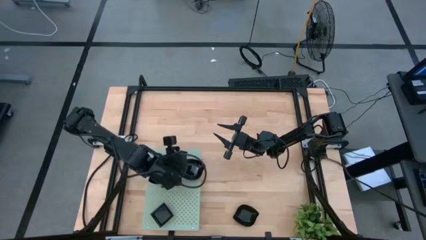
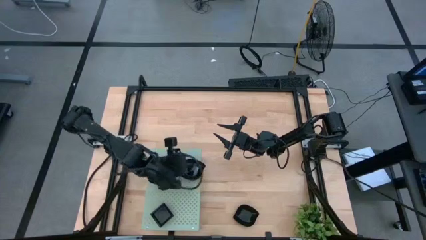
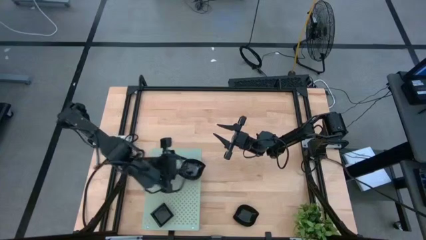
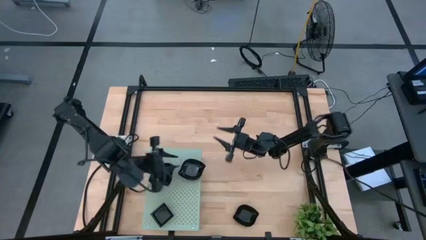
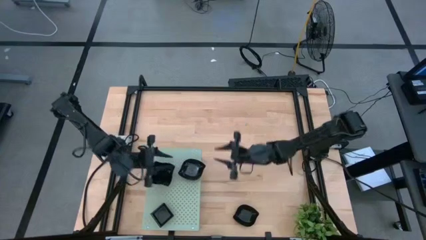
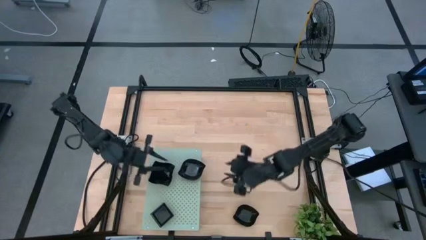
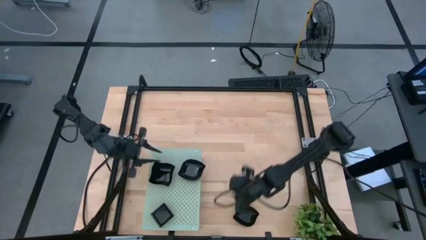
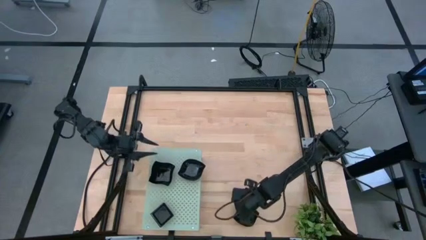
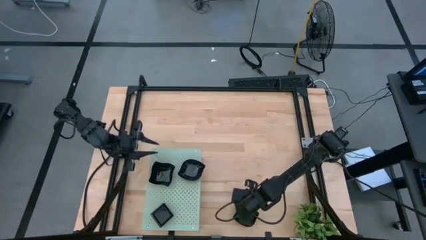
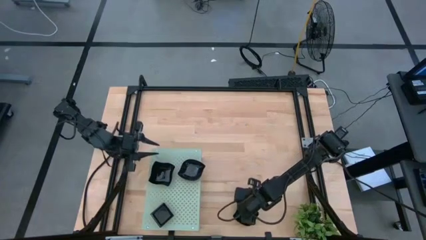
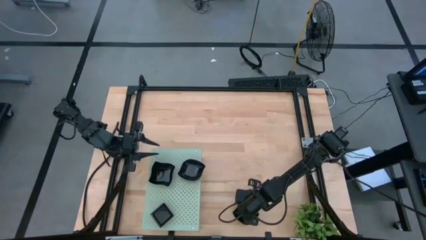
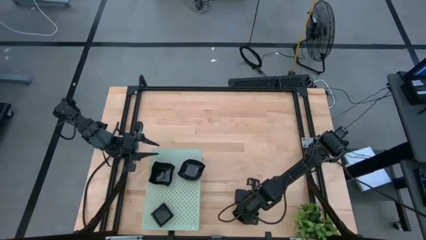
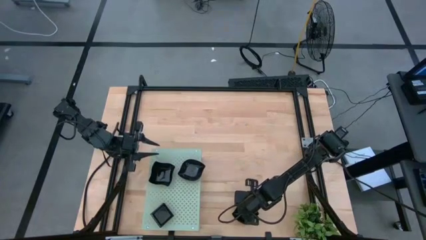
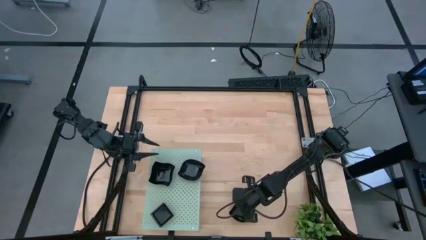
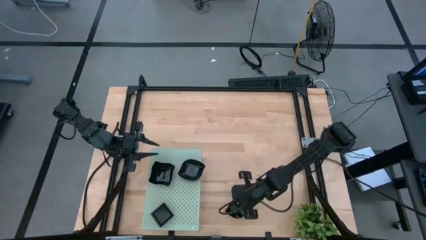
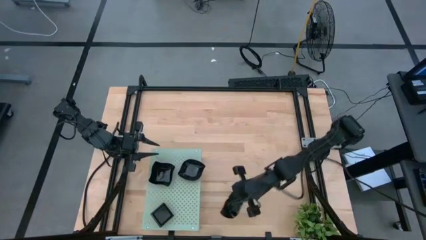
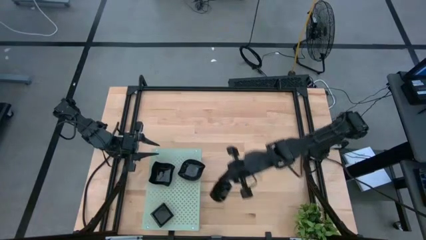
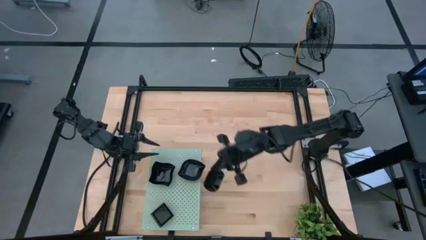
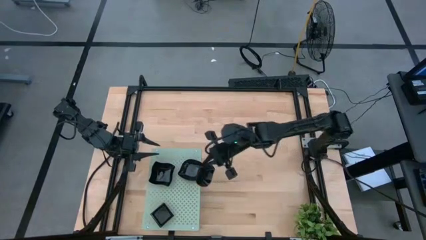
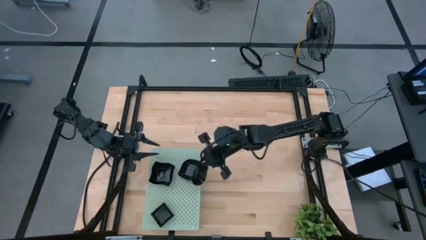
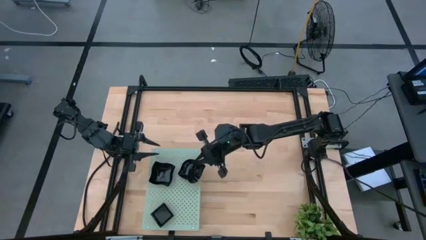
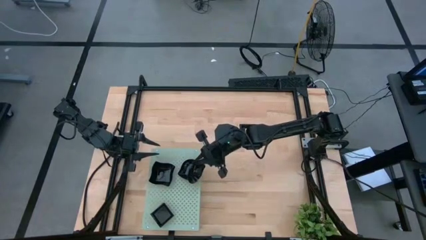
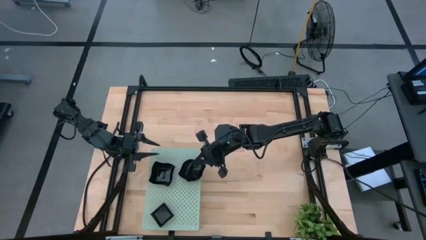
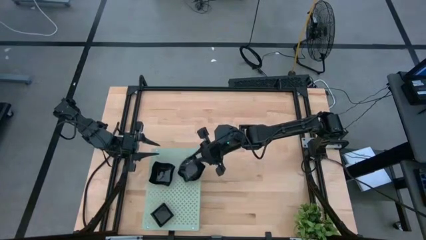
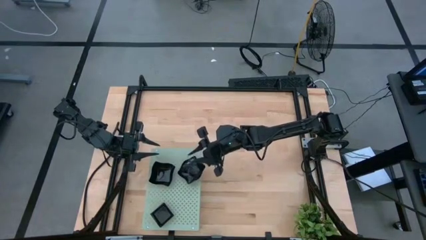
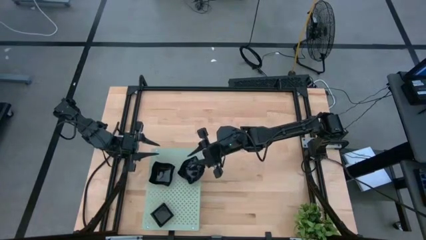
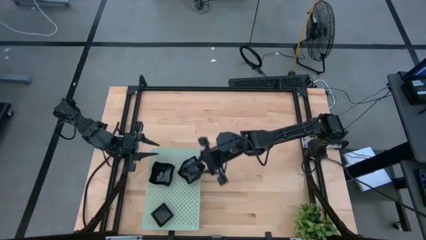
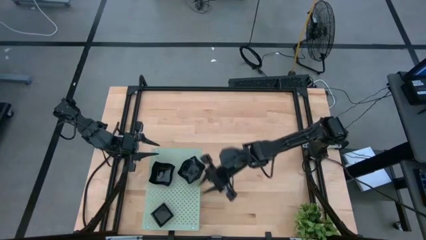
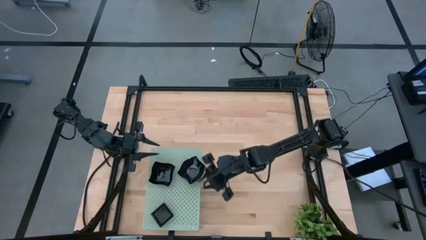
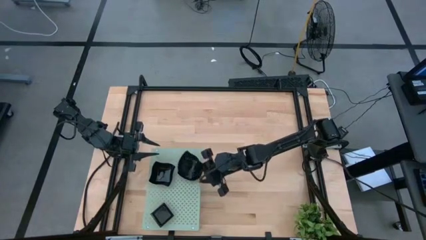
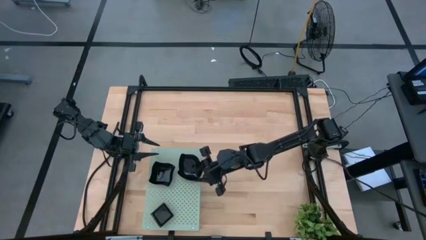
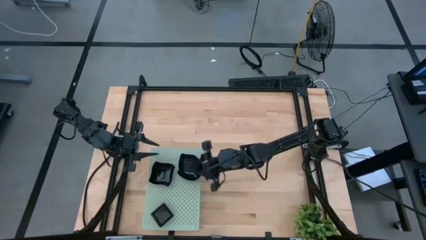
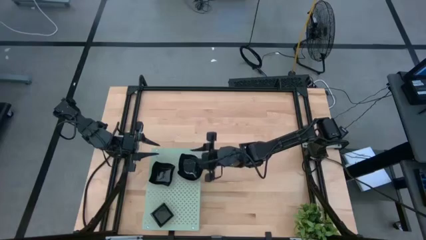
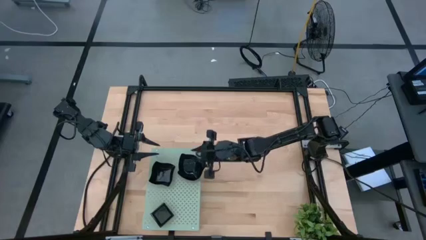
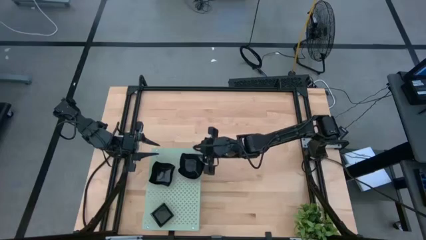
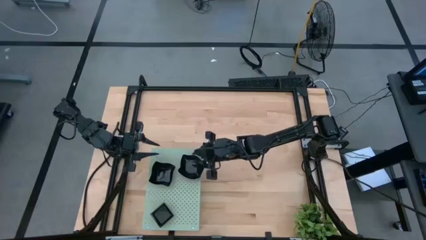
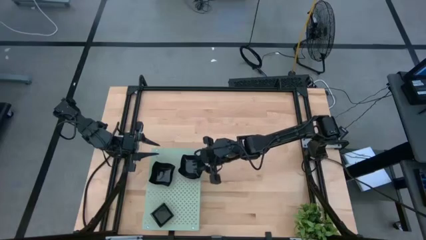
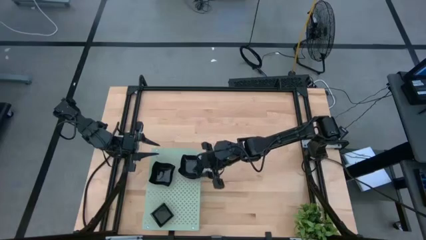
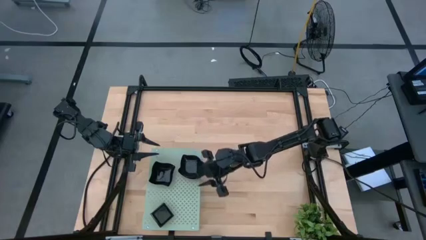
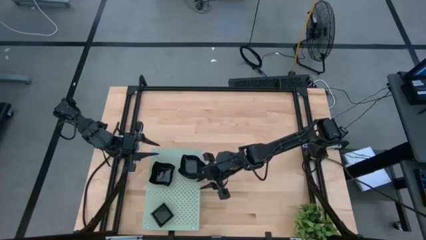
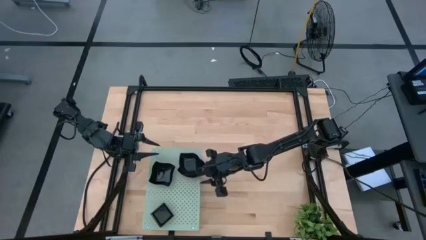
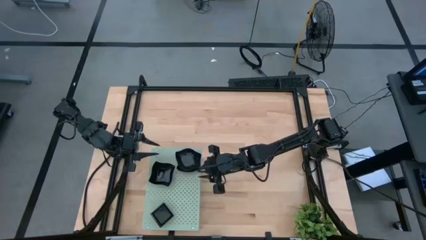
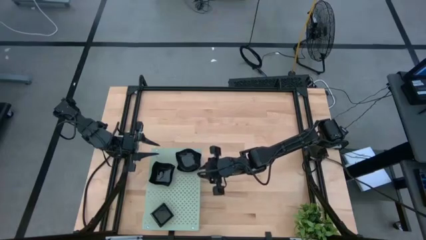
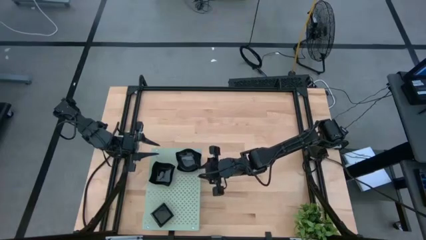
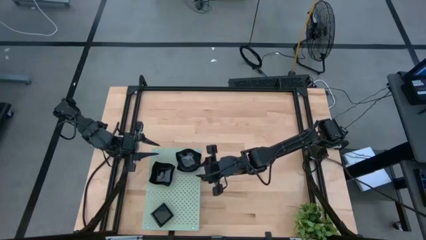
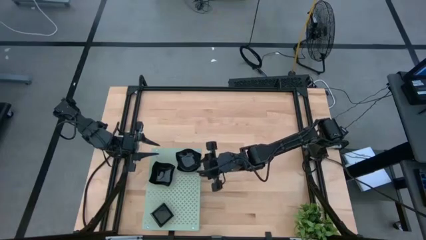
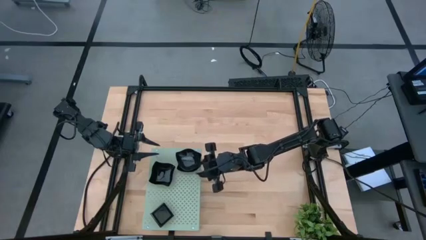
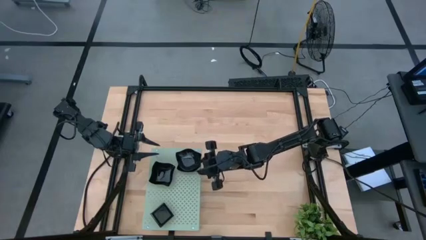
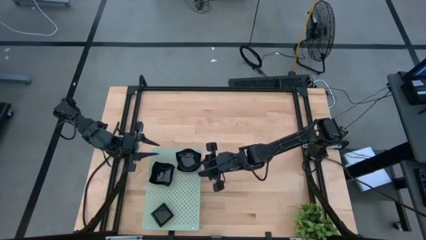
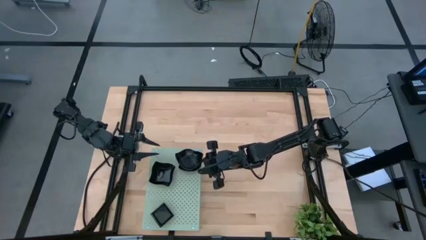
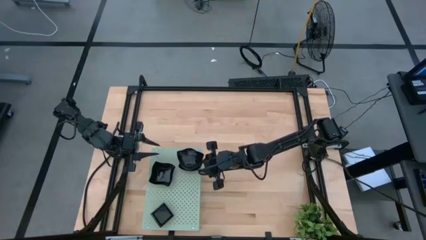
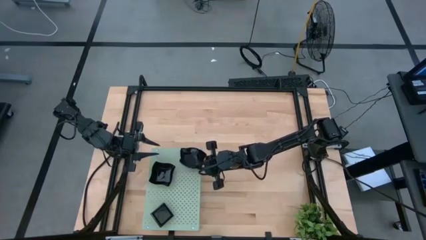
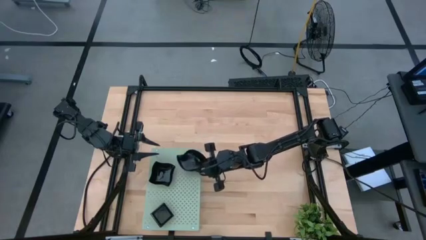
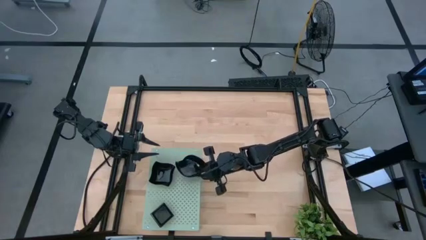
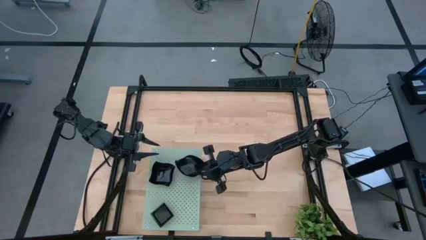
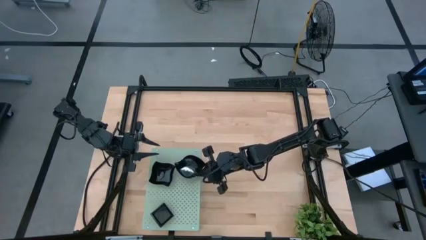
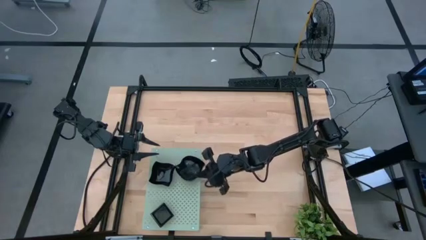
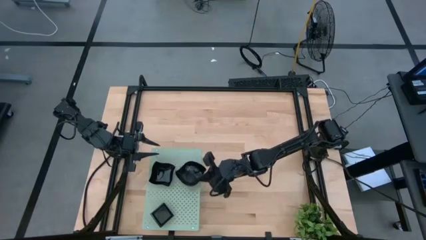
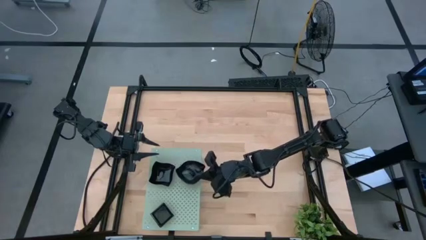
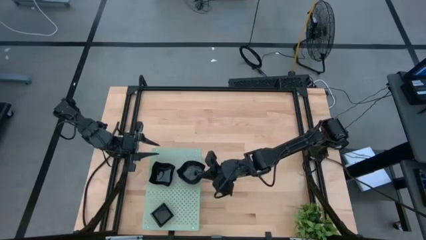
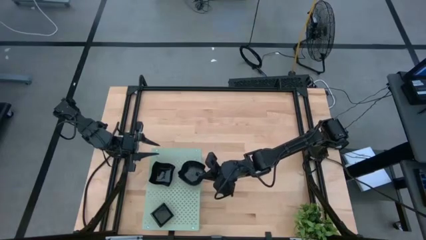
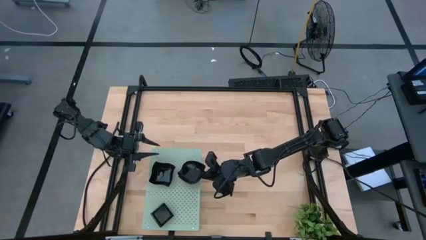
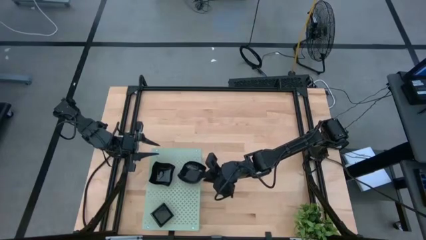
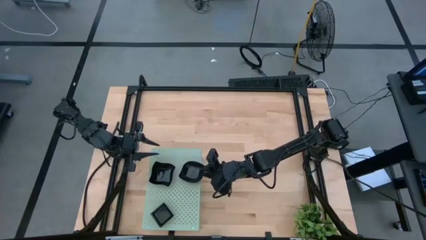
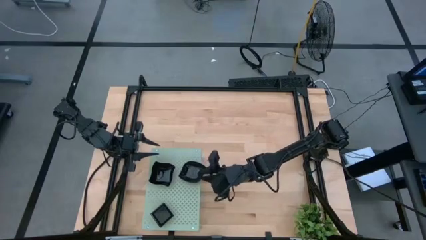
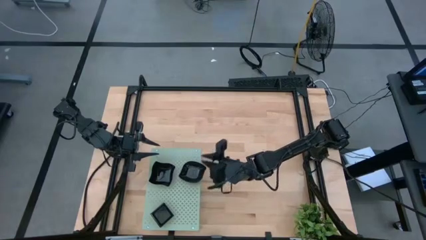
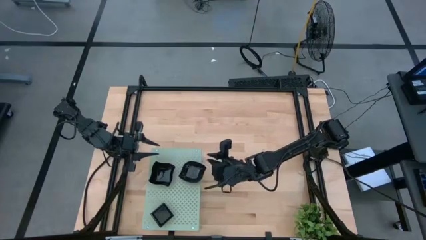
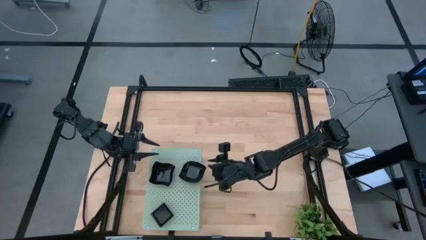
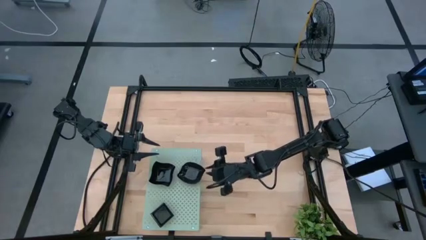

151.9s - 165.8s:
Task: Pick & Place Mini shaped plates
Stack the leaf shaped plate on top of the other leaf shaped plates on the shelf
